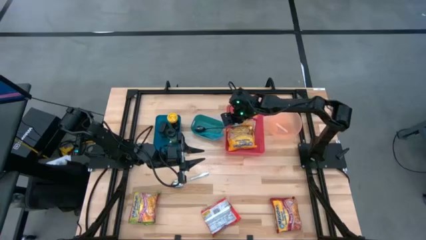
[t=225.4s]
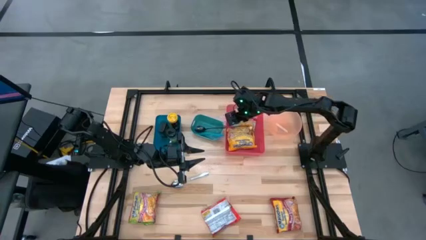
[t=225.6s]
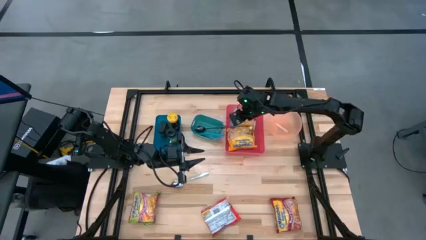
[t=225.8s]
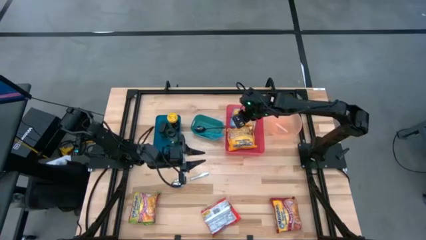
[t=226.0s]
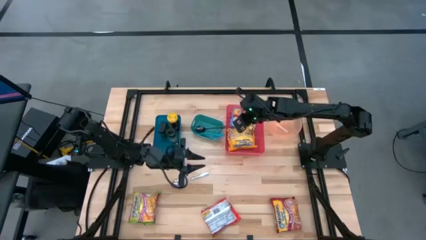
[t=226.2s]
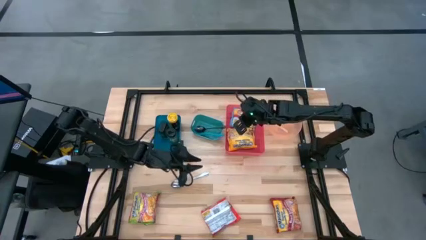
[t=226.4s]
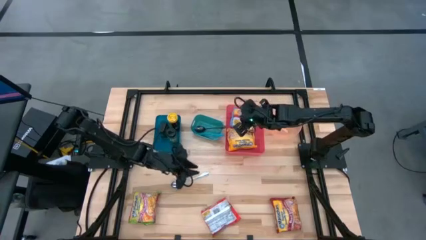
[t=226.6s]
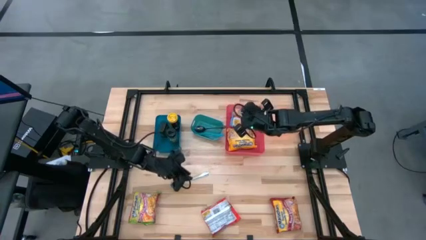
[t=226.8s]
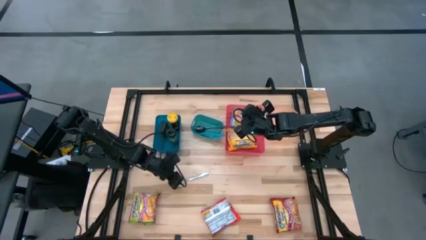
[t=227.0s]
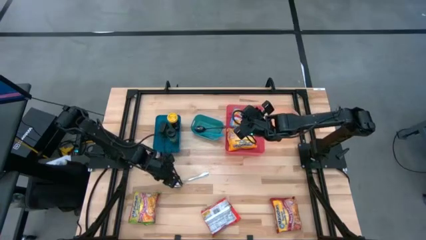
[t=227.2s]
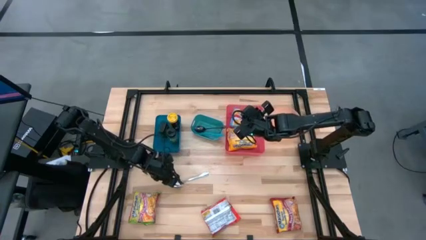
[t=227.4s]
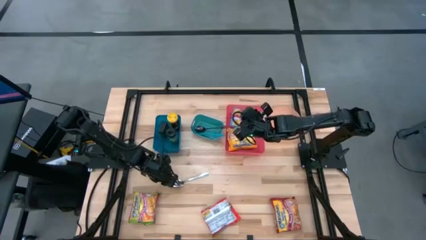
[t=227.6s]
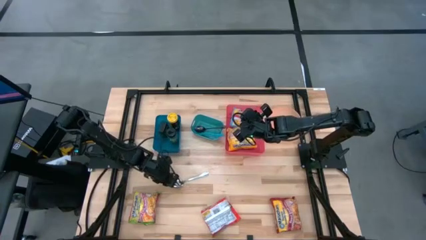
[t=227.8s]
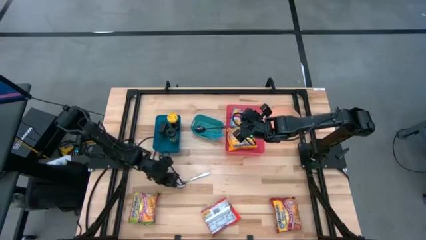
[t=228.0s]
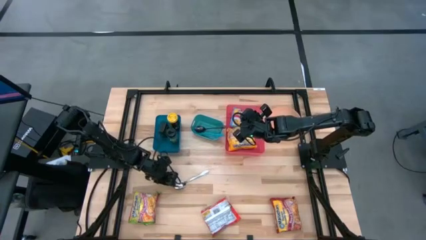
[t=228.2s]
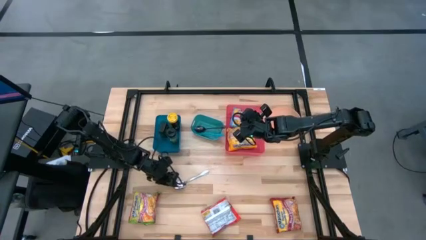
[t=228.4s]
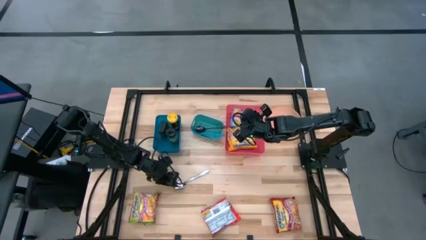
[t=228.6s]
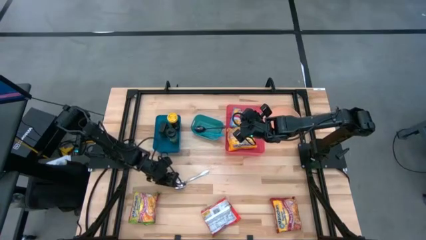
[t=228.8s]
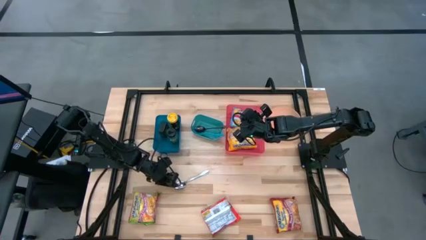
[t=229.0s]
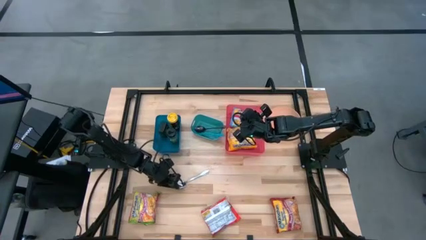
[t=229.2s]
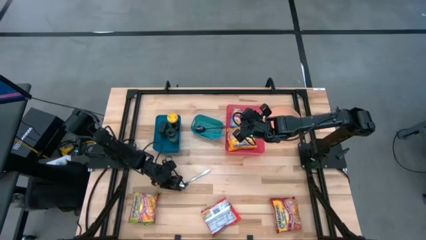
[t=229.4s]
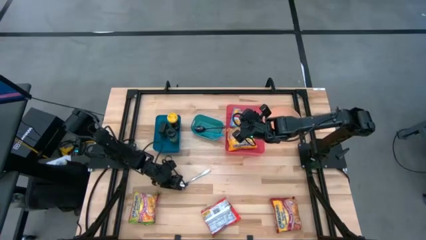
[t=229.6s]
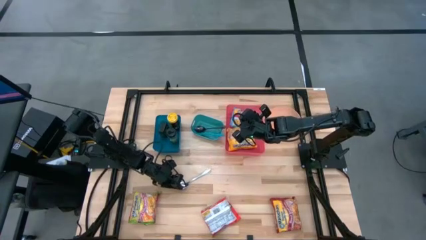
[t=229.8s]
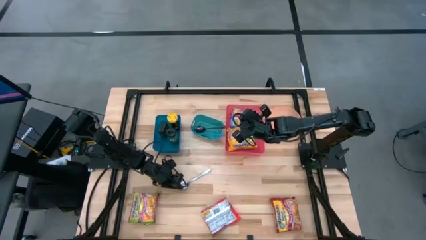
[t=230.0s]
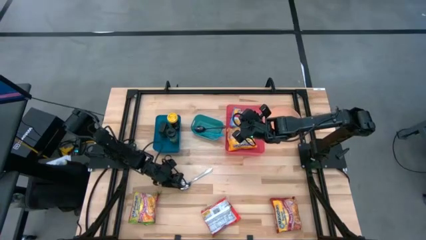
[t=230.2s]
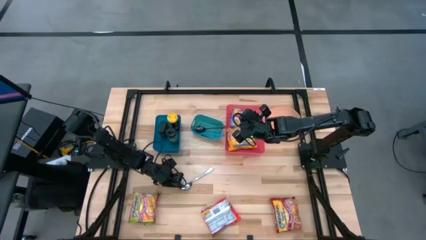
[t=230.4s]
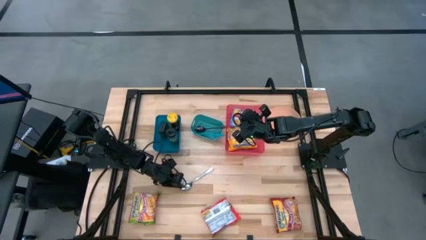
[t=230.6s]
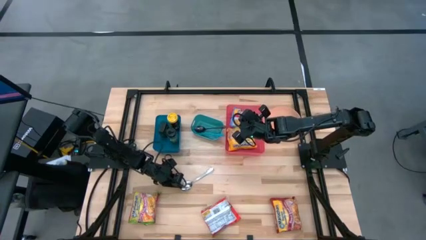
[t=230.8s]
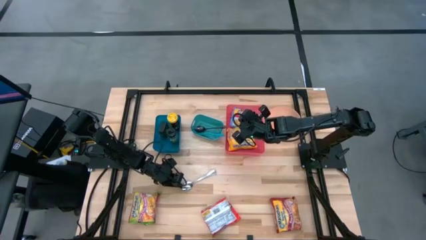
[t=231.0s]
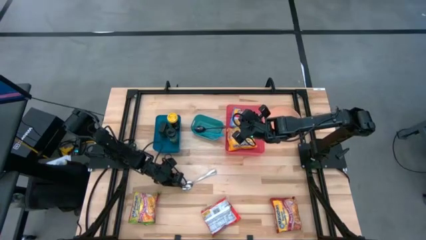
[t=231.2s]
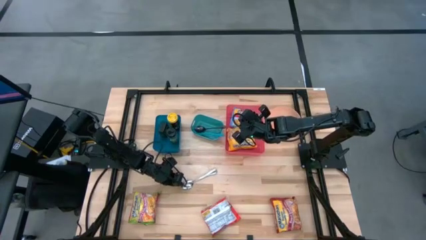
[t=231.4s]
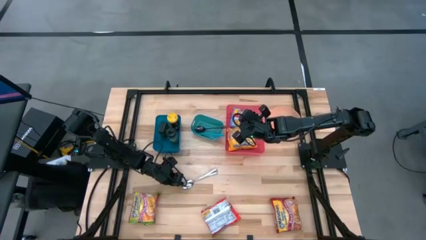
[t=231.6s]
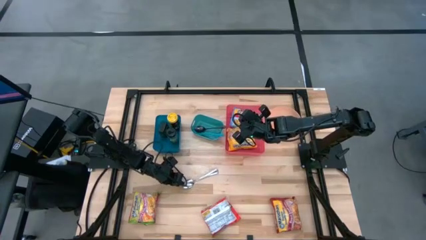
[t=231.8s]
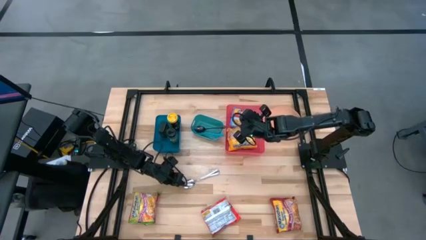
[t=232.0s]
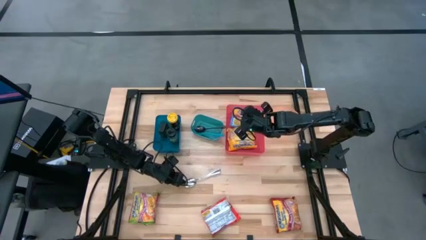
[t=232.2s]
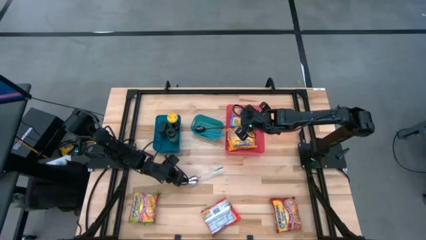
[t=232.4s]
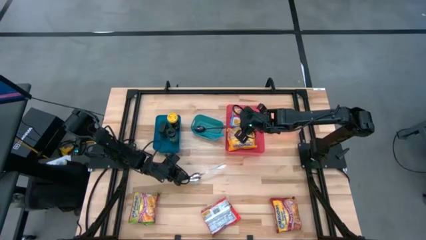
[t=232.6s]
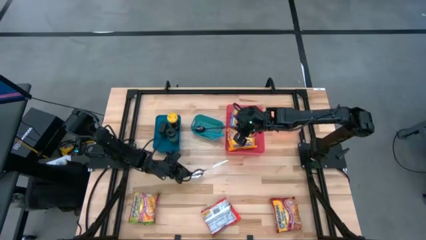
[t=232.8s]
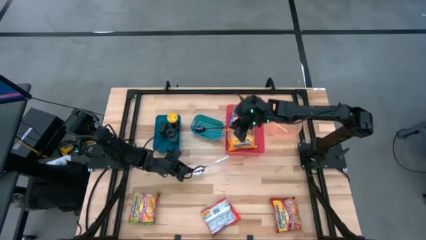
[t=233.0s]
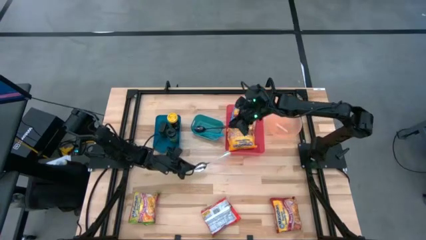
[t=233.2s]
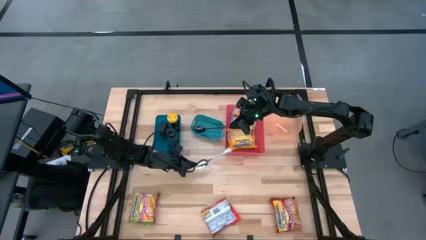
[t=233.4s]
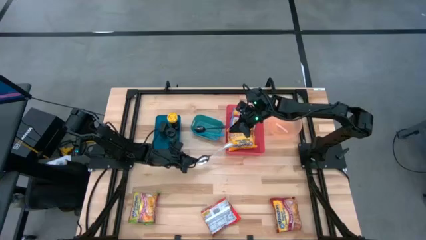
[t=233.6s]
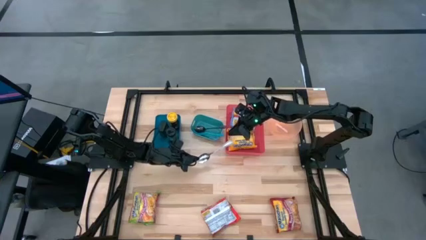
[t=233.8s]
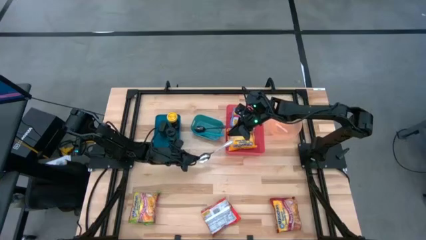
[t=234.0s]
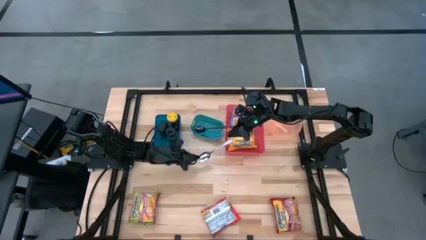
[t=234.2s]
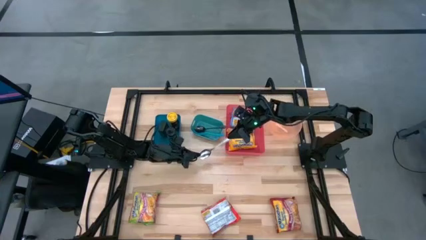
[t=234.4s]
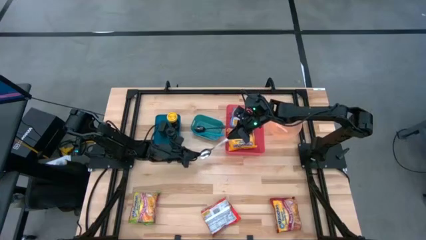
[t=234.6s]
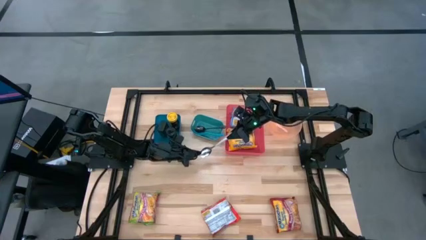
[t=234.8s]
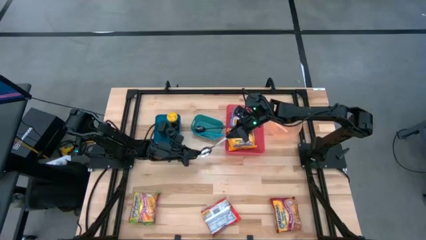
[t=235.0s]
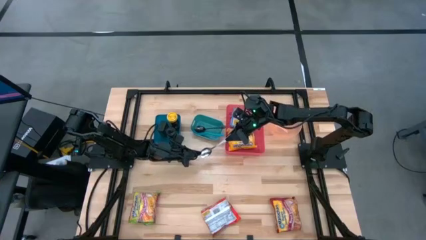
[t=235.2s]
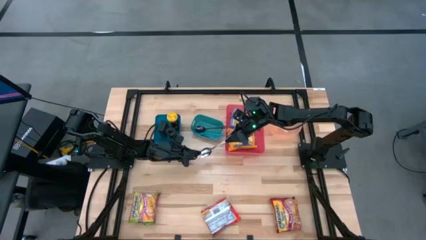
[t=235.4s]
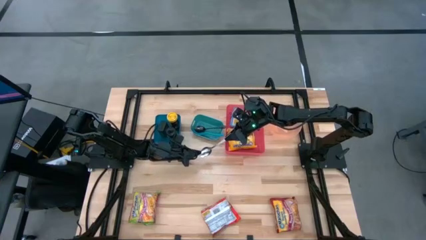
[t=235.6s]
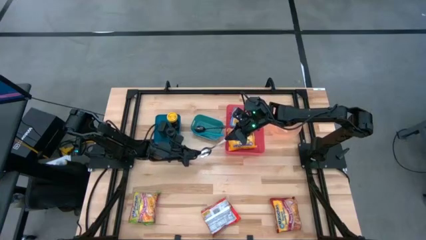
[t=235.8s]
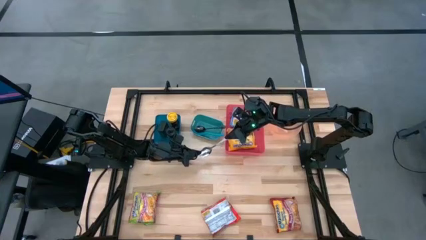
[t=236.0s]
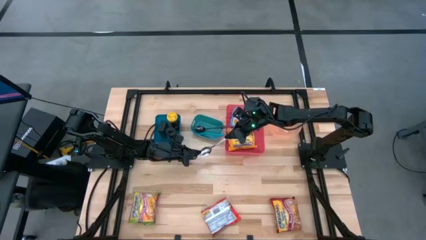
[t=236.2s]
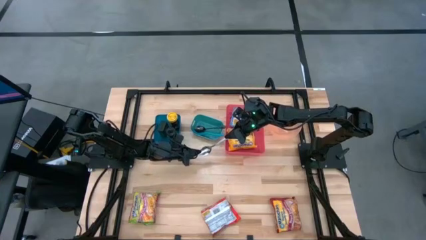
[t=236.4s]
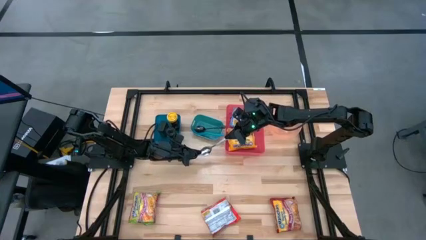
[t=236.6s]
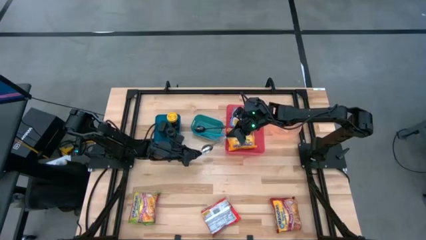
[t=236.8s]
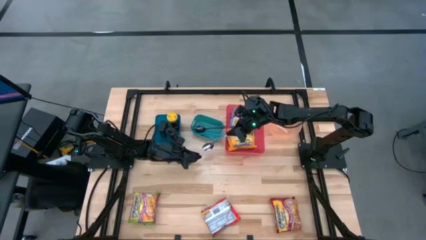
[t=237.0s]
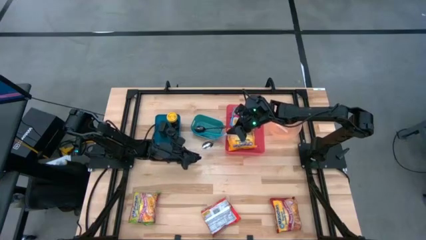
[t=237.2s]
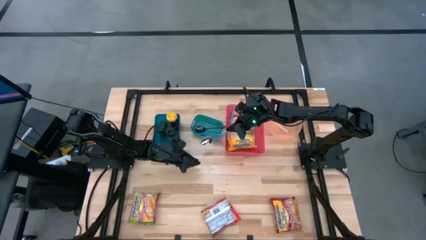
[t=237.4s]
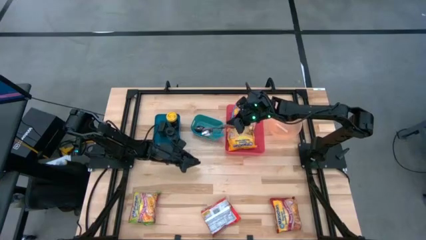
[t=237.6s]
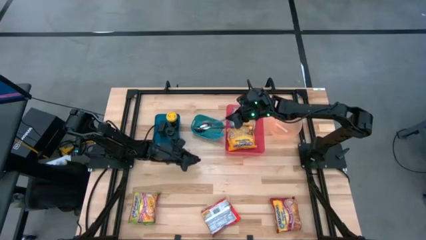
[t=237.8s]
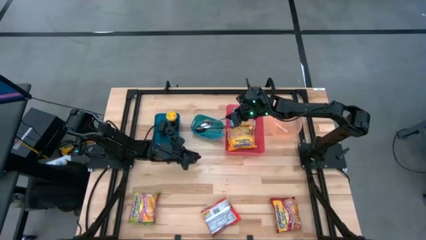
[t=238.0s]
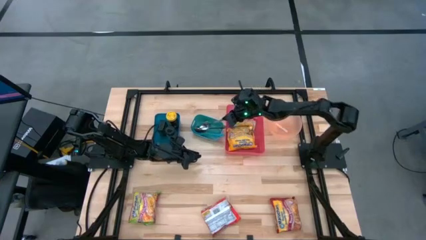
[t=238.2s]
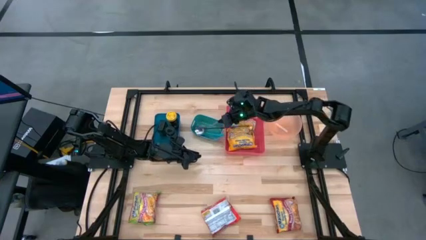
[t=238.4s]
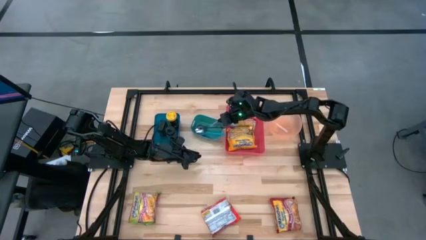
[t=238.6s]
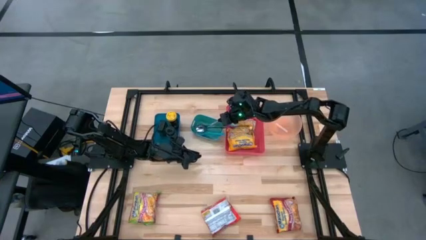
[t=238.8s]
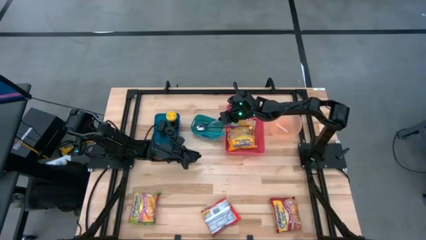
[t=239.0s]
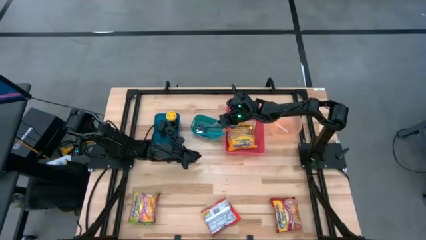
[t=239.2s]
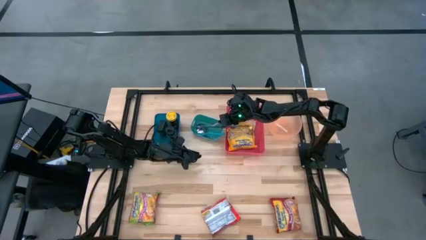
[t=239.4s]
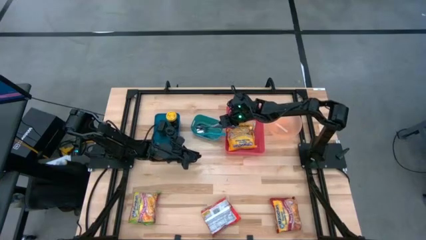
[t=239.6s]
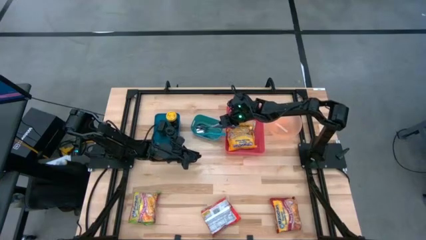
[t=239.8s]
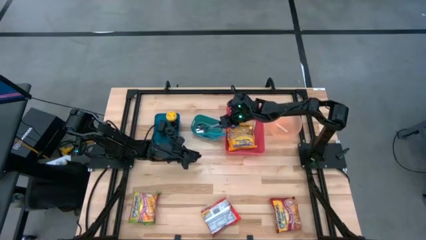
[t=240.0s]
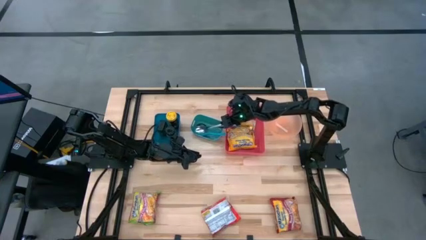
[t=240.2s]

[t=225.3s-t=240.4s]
Task: Pick & Place Food Item
Put the silver spoon into the green bin

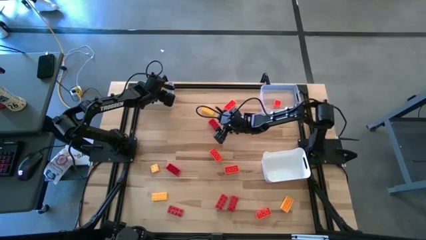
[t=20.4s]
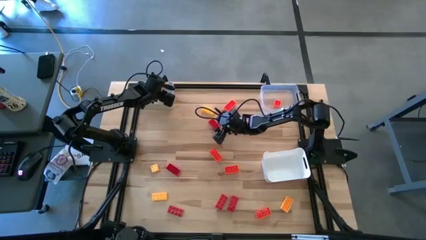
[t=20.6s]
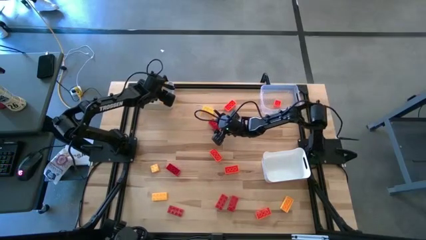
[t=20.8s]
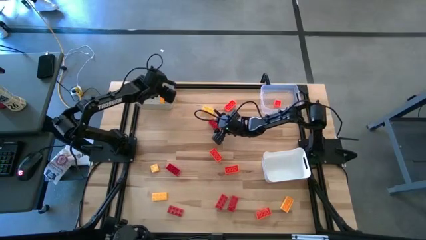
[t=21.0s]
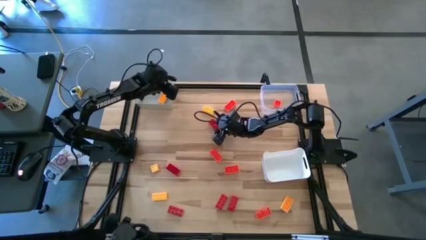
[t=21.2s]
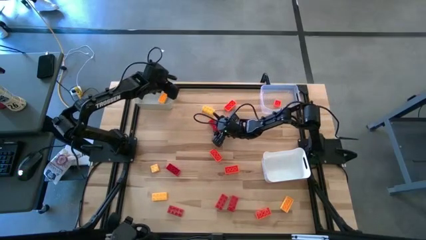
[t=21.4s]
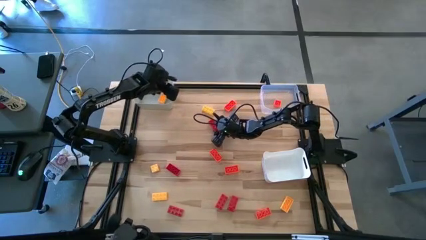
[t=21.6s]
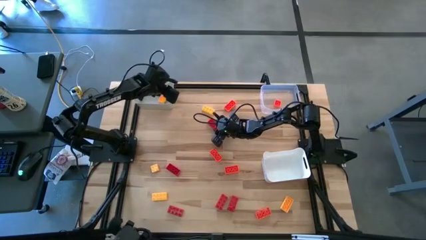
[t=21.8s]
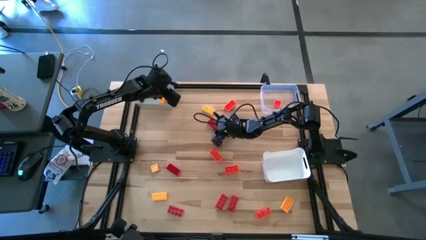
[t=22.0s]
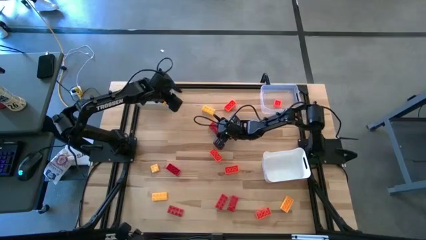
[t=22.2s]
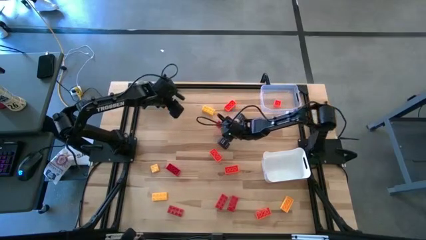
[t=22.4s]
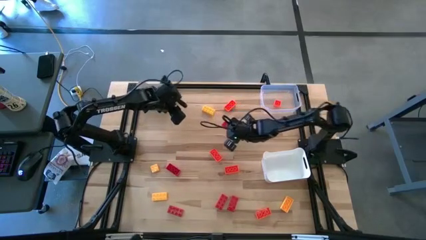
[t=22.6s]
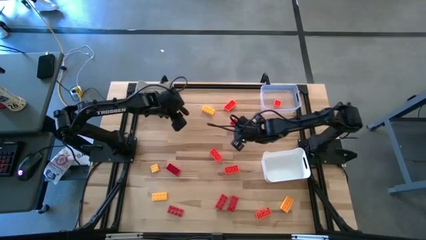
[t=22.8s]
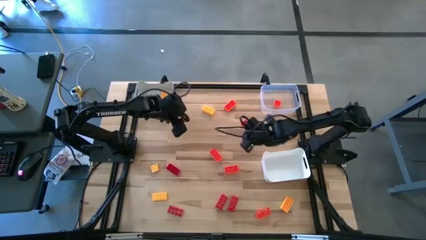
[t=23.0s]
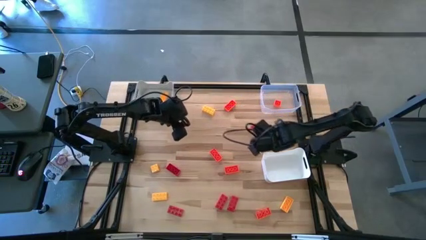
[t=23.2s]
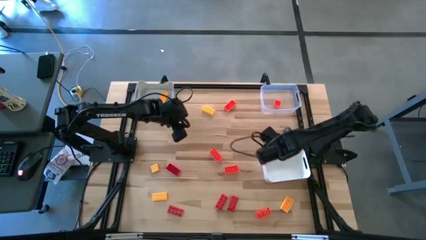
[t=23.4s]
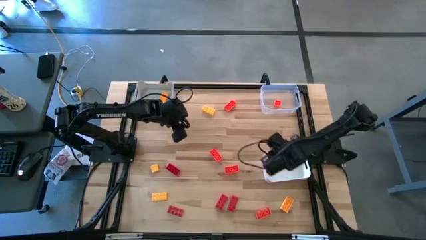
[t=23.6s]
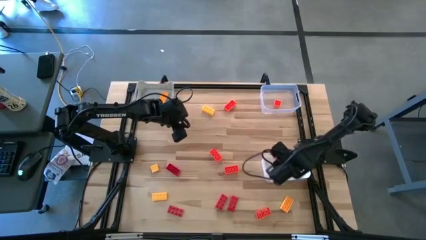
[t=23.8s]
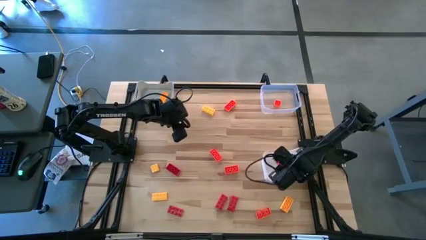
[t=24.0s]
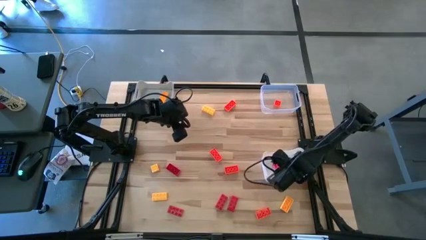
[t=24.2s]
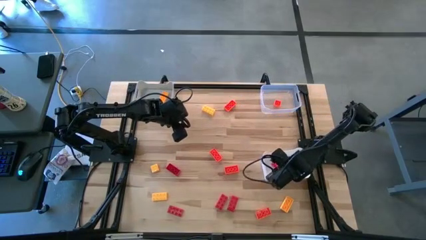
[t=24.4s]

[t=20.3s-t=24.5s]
Task: Sort & place blocks by color
Put the red block into the white bin
